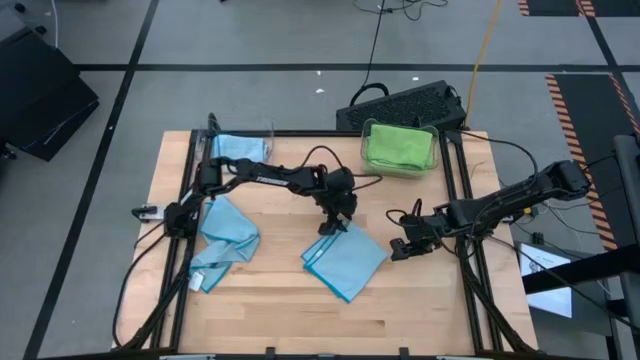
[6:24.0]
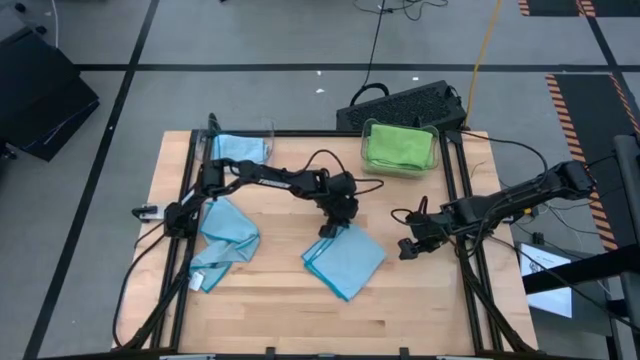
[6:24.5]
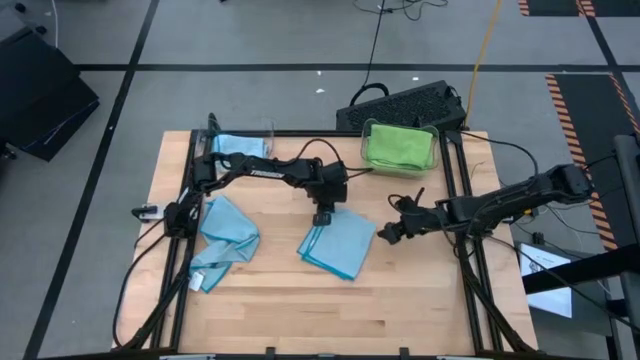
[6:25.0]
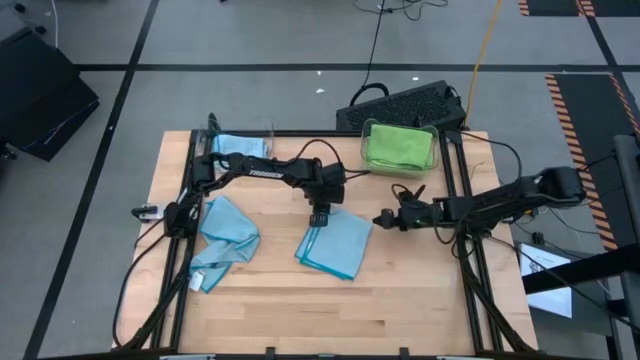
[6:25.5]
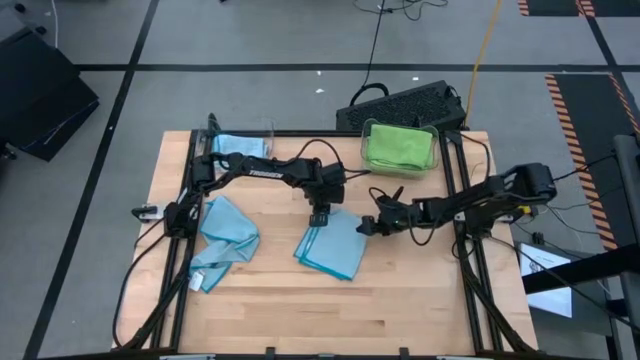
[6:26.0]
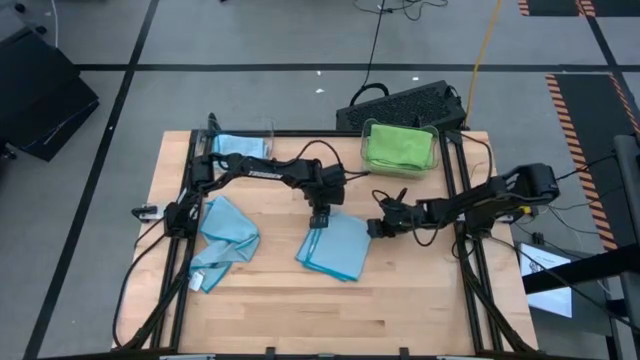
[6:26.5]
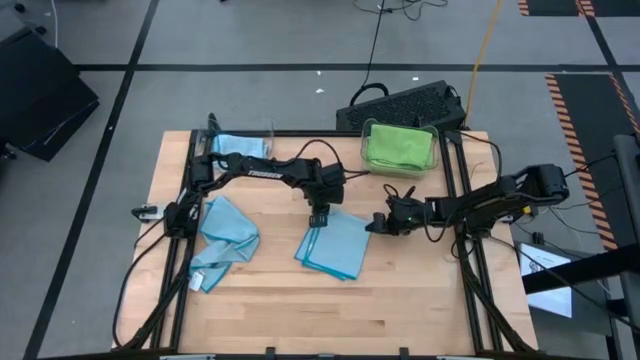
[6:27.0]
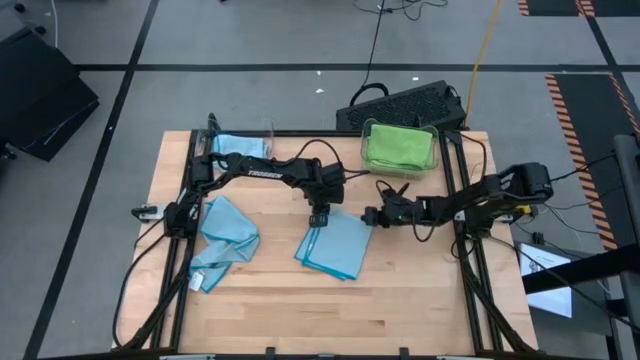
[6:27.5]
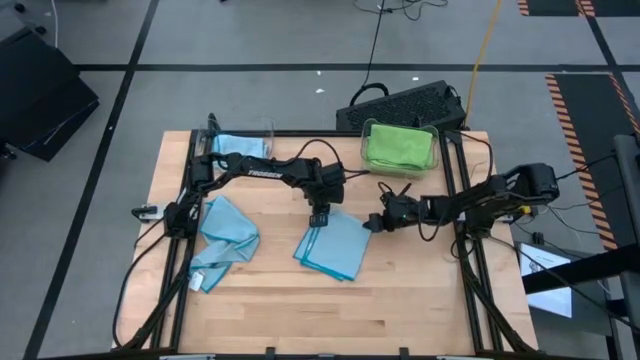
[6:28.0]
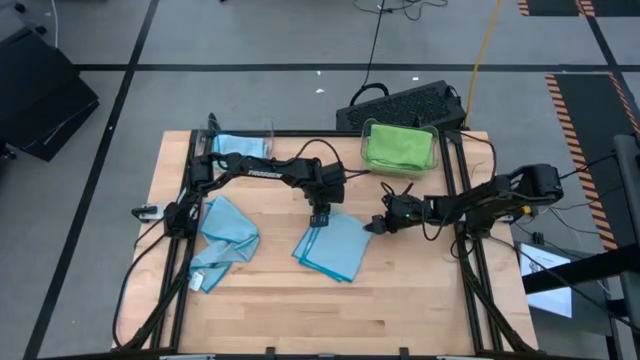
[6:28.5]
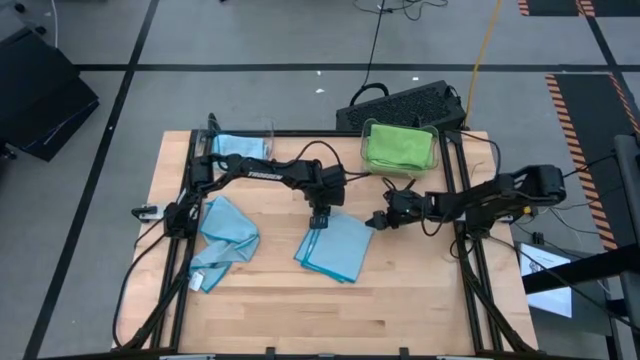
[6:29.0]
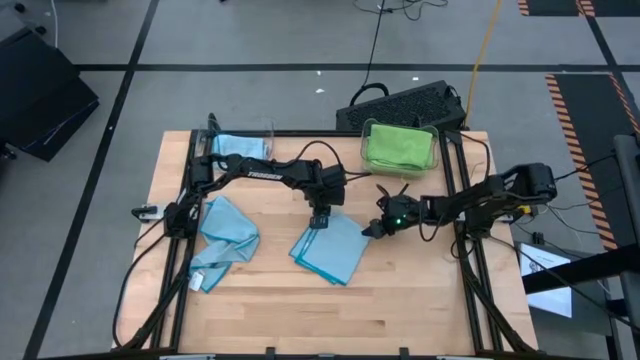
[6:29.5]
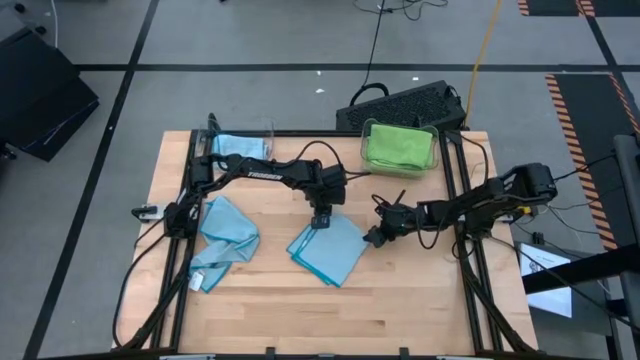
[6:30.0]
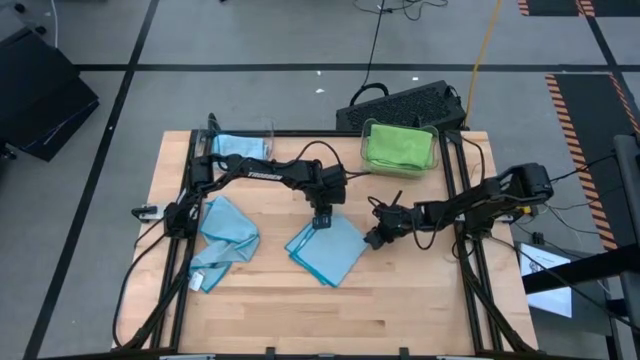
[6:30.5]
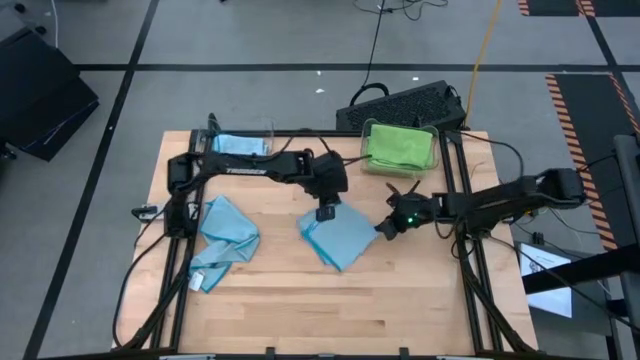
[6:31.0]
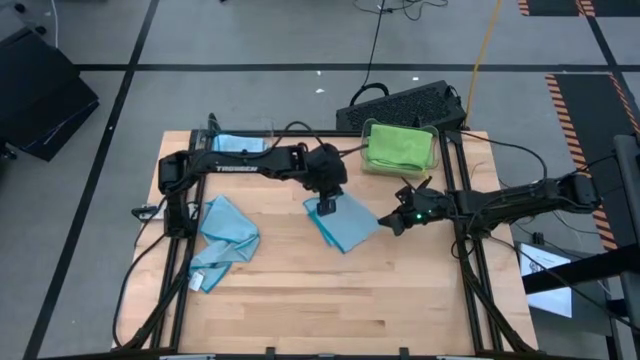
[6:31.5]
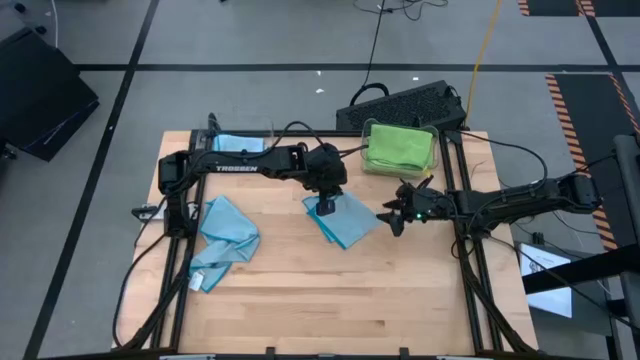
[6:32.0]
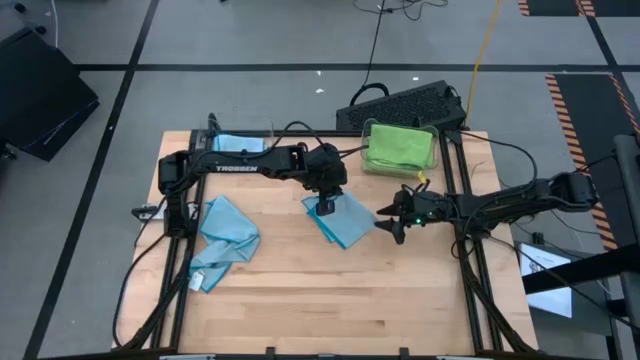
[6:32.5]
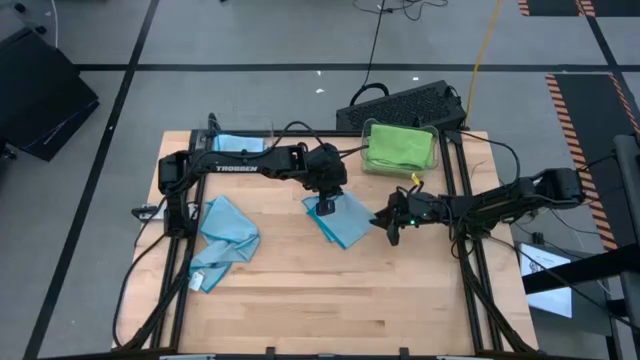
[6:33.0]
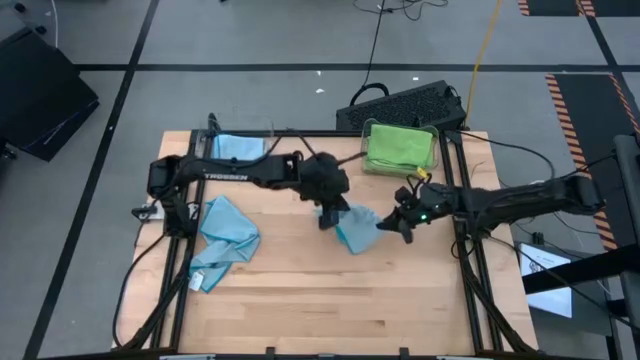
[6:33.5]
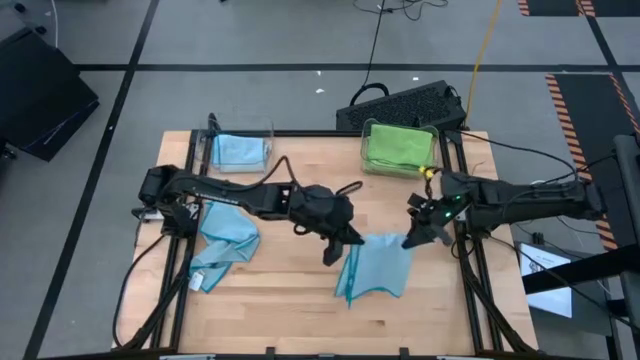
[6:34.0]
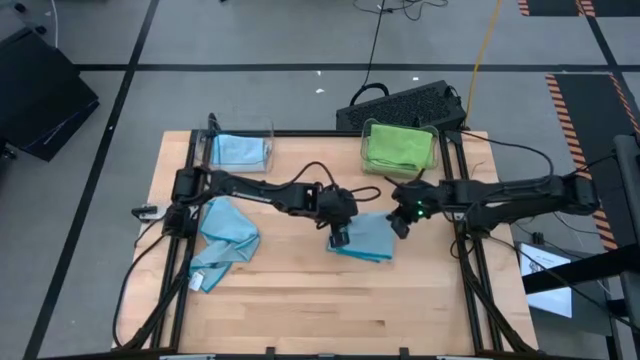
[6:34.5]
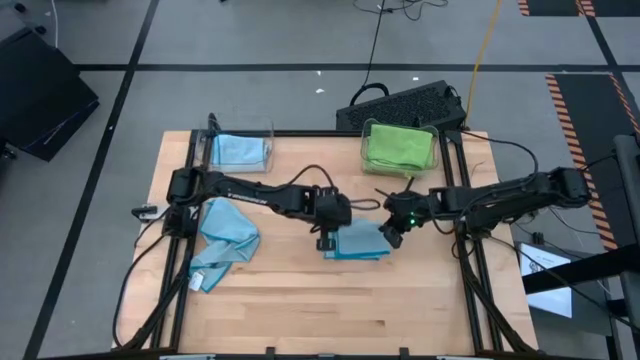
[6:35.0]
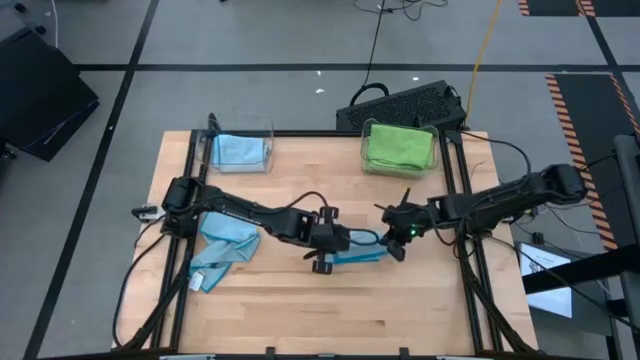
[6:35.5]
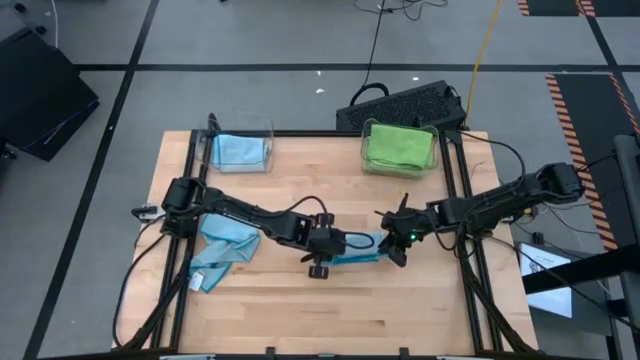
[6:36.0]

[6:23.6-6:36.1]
Task: Sort microfiber towel by color & place in baskets
Fold the right blue towel

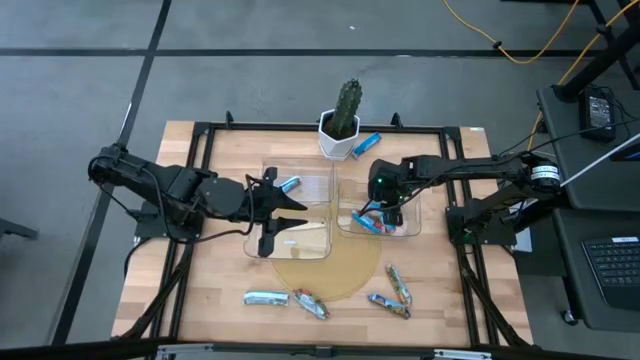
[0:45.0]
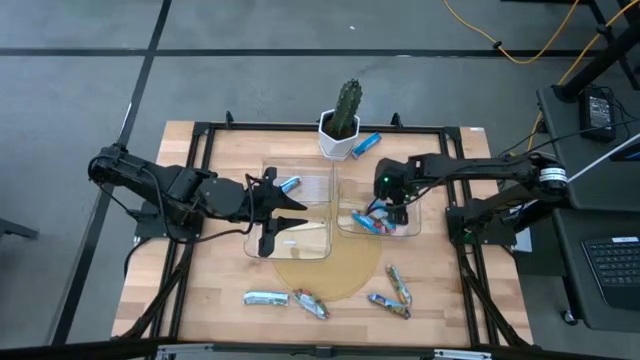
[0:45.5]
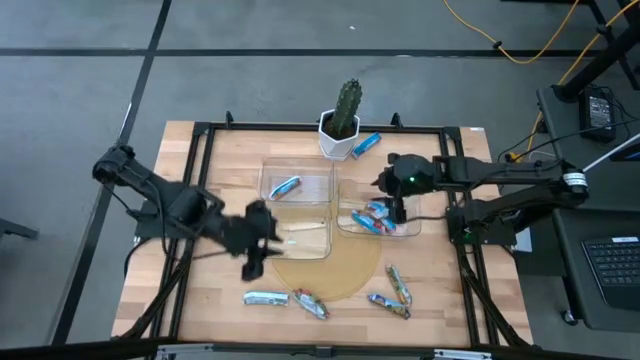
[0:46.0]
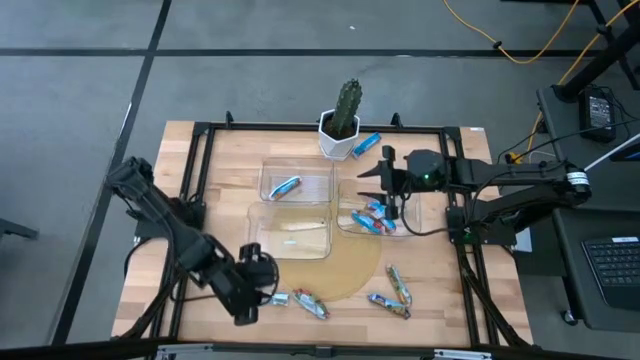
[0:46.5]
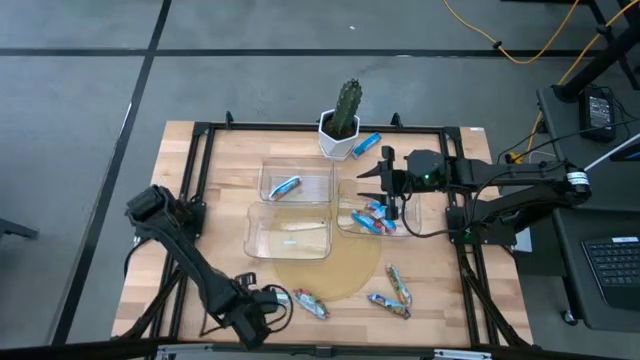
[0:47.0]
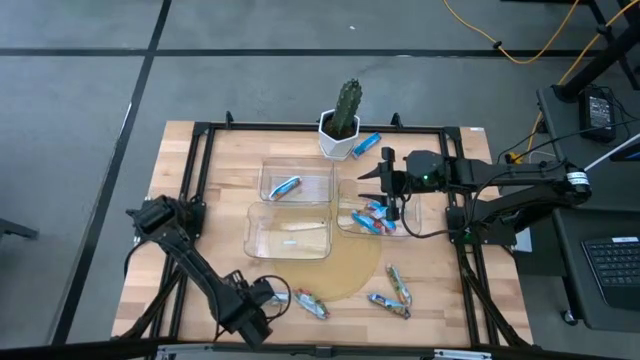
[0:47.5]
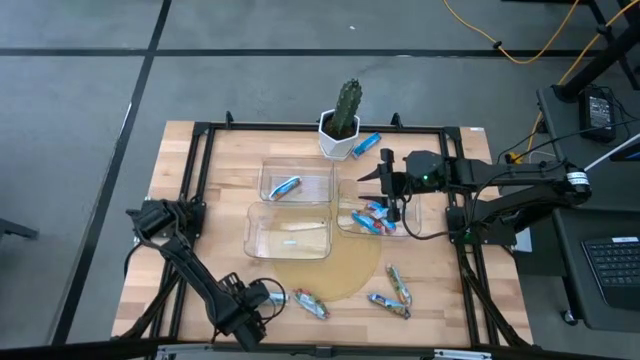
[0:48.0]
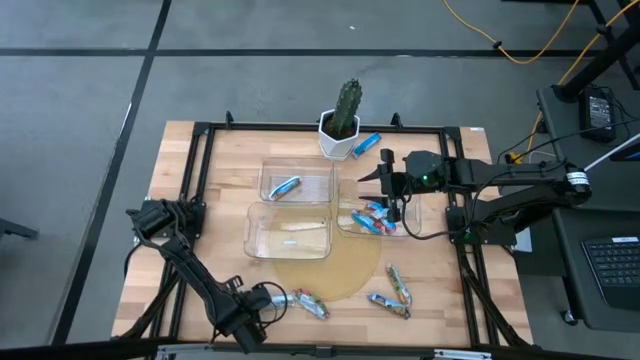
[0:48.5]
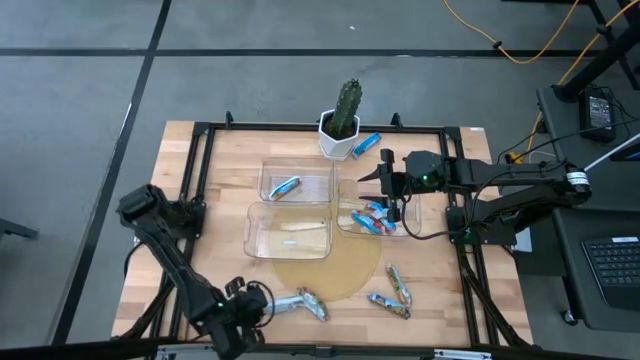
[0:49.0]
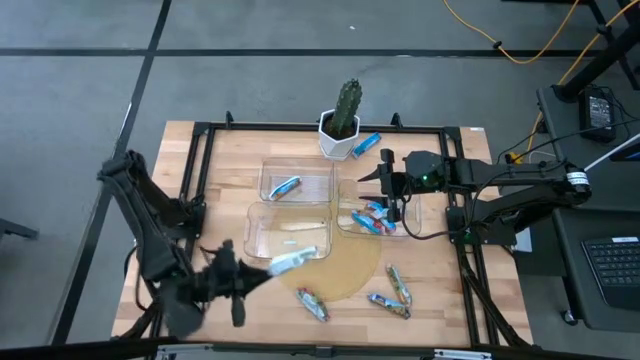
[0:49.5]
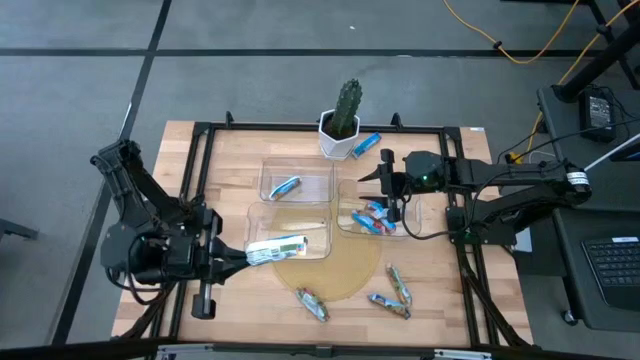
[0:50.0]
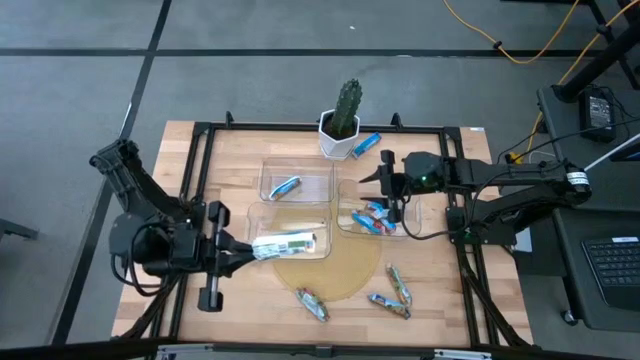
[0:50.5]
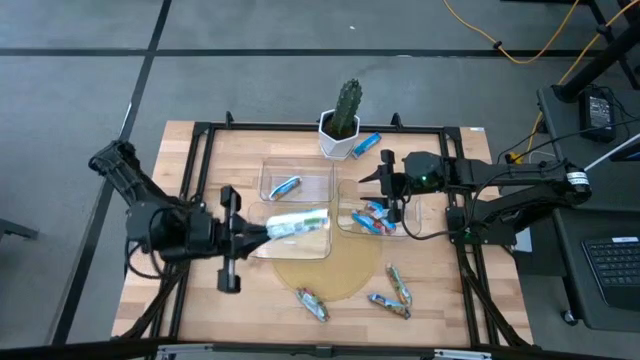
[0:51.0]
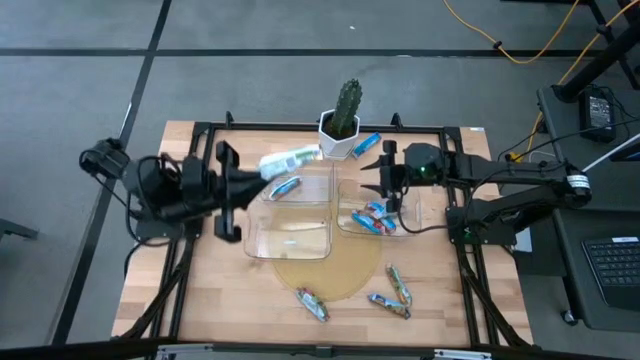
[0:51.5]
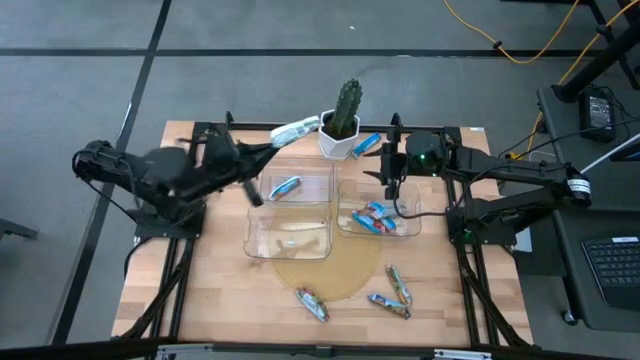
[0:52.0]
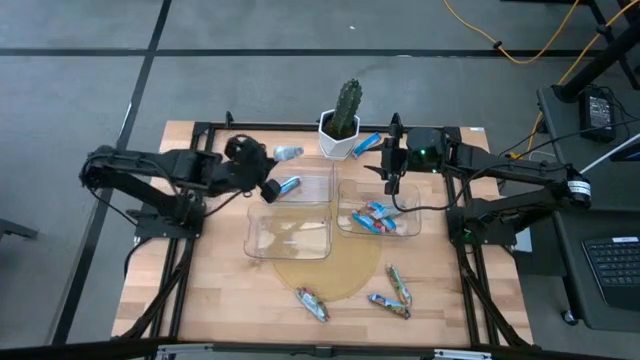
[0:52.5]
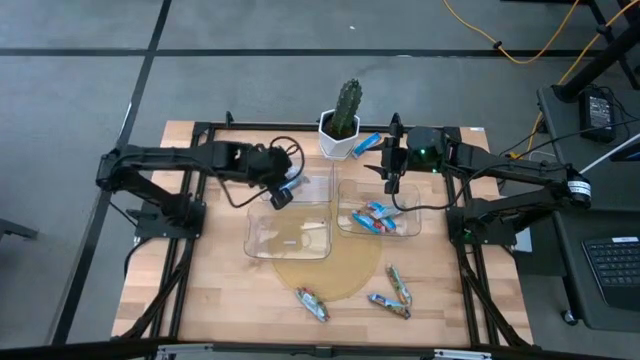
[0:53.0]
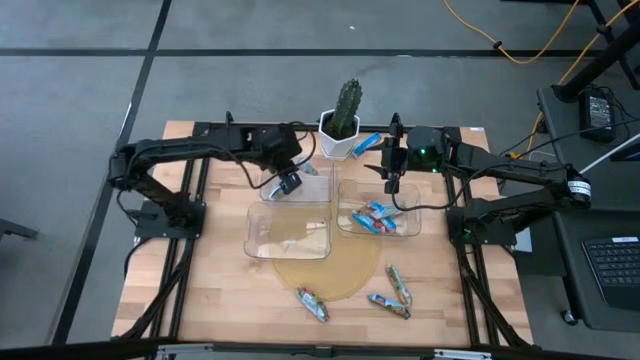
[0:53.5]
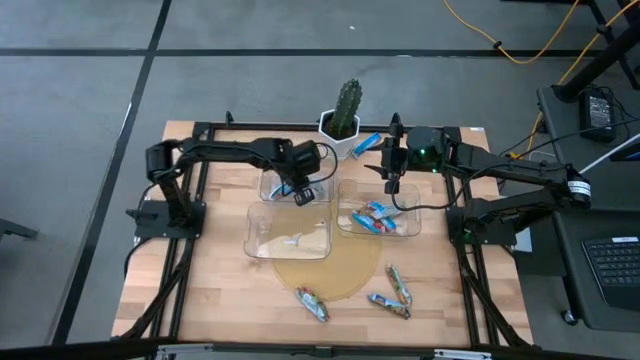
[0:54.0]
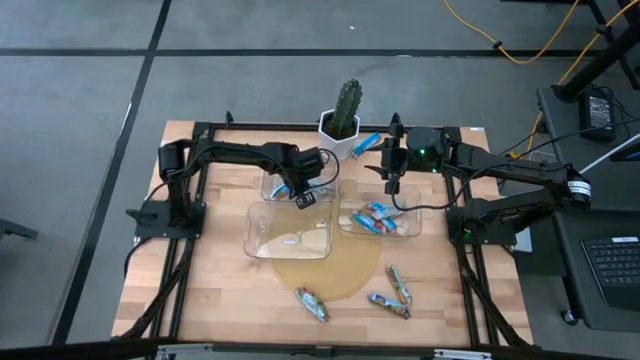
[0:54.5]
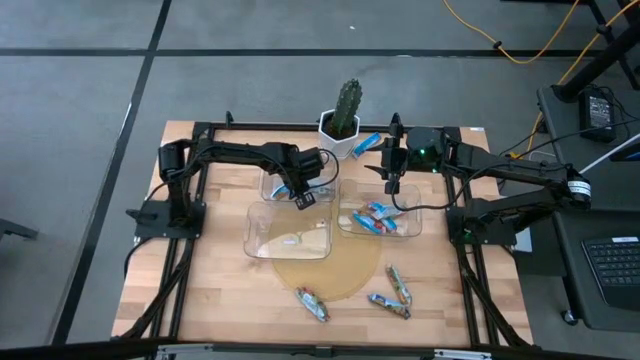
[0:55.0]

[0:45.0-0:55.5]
Task: Pick and place Granola Bars by type
Put the left yellow granola bar into the top bin
